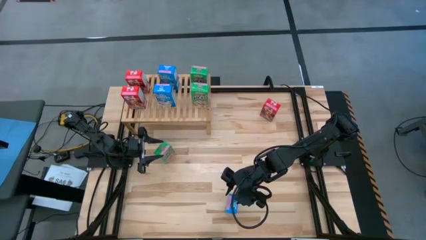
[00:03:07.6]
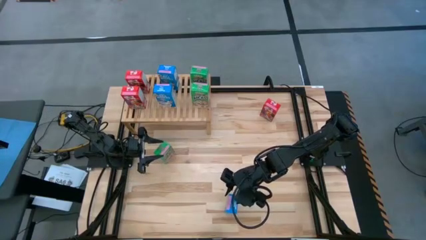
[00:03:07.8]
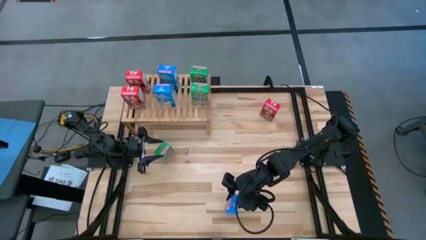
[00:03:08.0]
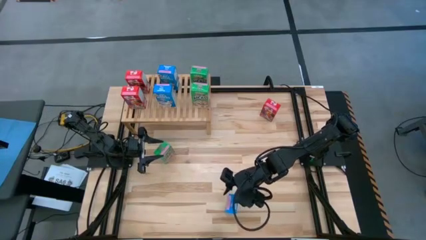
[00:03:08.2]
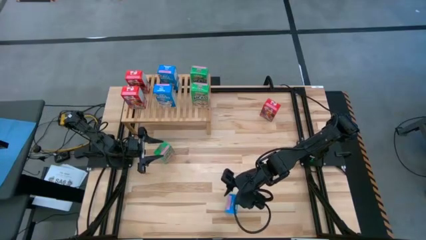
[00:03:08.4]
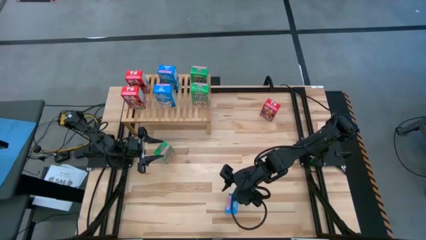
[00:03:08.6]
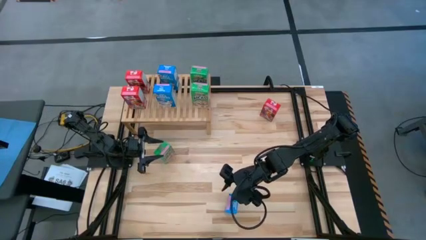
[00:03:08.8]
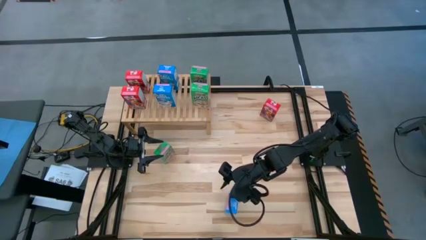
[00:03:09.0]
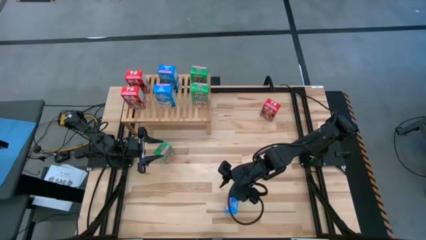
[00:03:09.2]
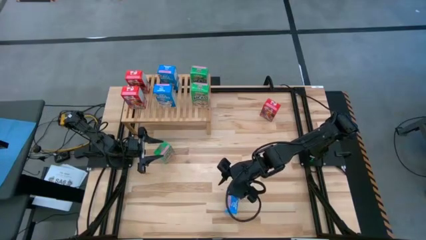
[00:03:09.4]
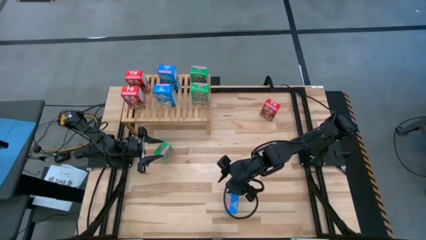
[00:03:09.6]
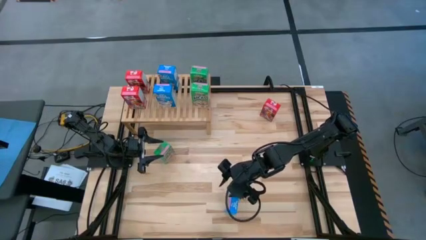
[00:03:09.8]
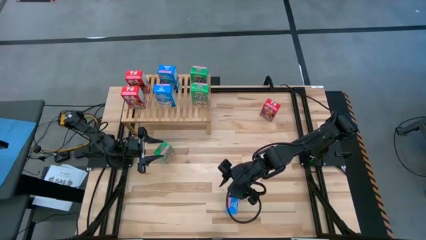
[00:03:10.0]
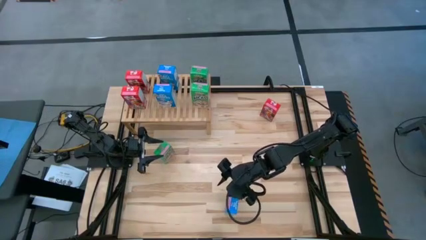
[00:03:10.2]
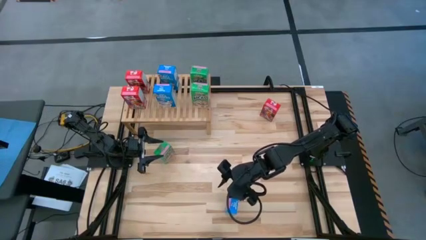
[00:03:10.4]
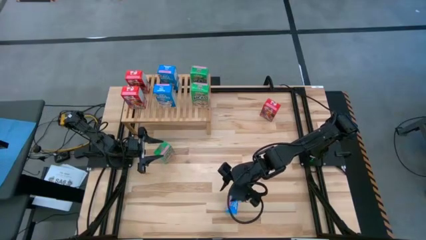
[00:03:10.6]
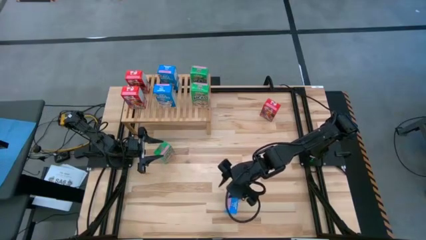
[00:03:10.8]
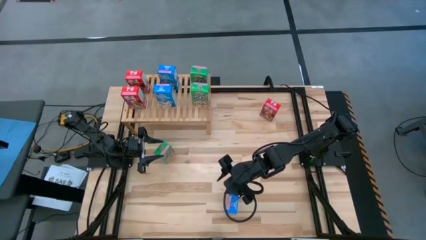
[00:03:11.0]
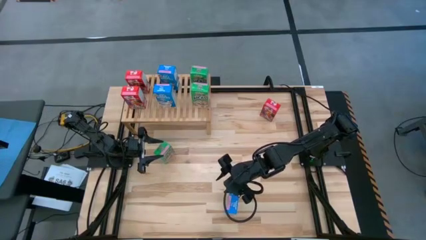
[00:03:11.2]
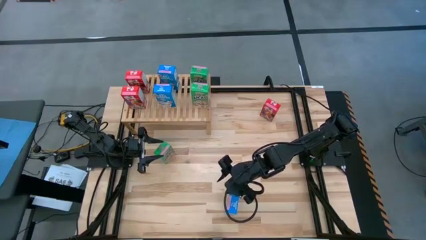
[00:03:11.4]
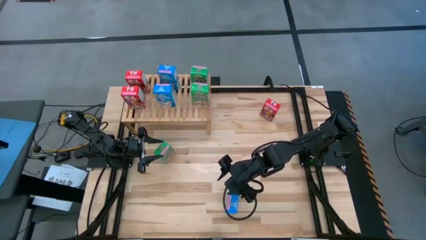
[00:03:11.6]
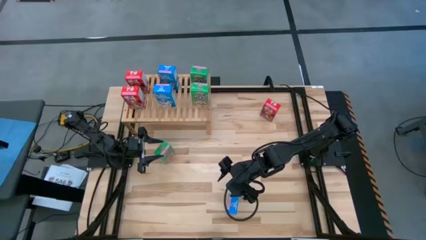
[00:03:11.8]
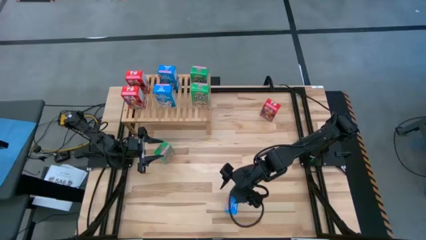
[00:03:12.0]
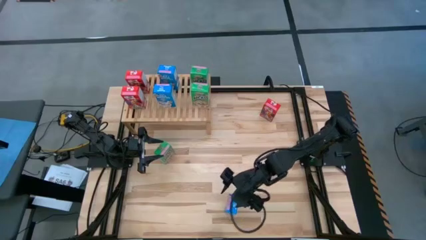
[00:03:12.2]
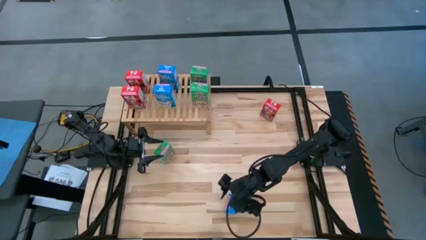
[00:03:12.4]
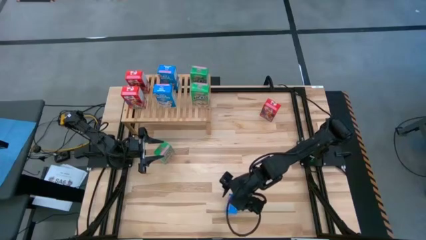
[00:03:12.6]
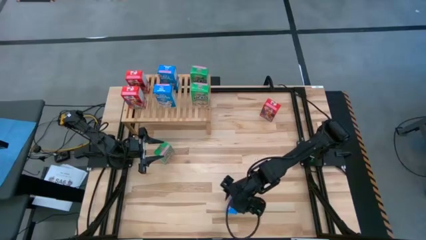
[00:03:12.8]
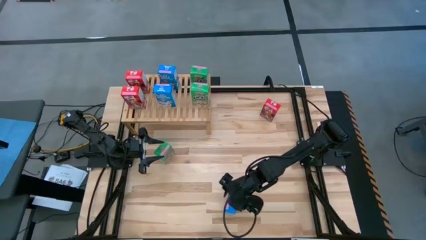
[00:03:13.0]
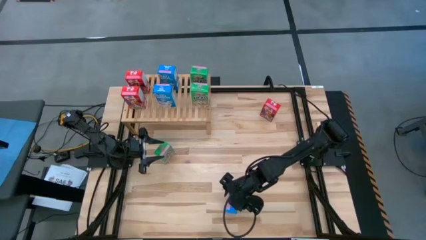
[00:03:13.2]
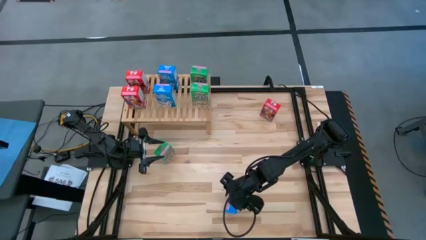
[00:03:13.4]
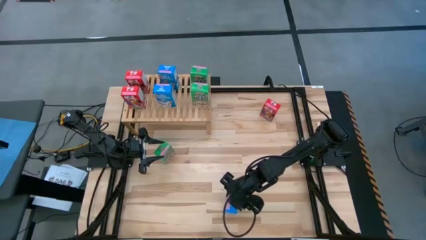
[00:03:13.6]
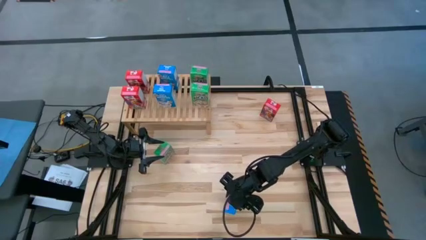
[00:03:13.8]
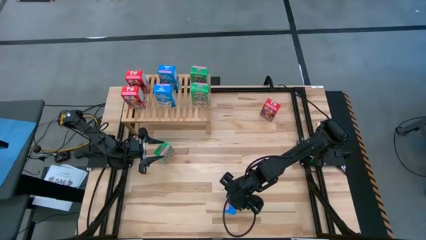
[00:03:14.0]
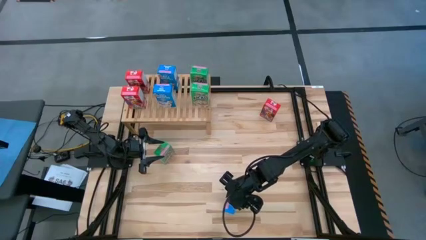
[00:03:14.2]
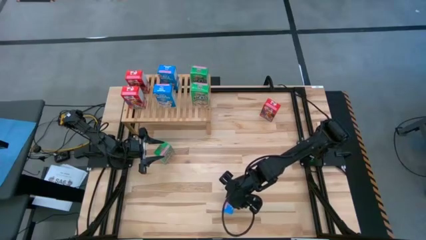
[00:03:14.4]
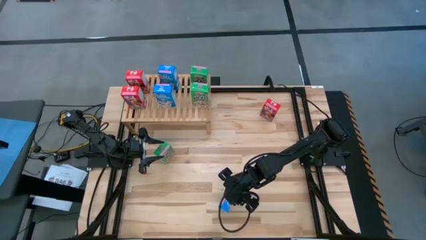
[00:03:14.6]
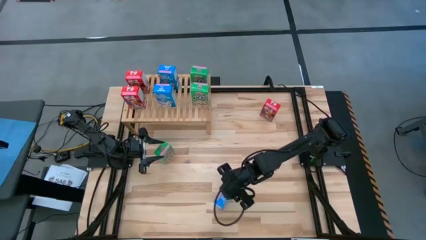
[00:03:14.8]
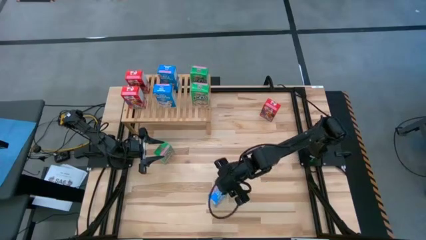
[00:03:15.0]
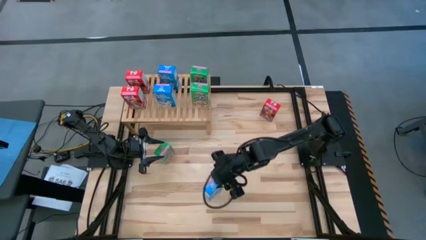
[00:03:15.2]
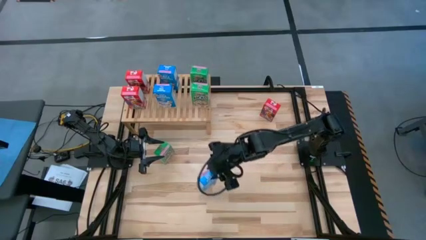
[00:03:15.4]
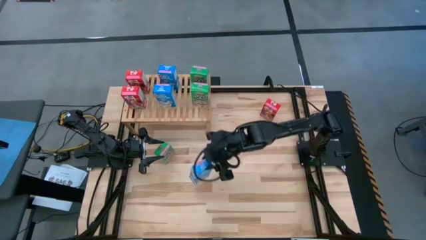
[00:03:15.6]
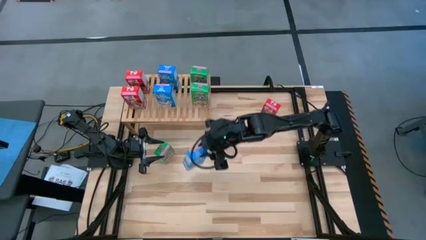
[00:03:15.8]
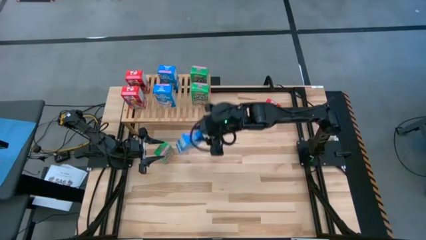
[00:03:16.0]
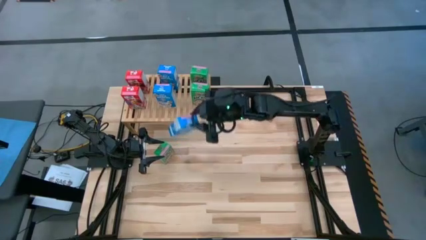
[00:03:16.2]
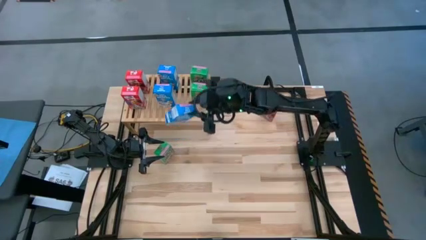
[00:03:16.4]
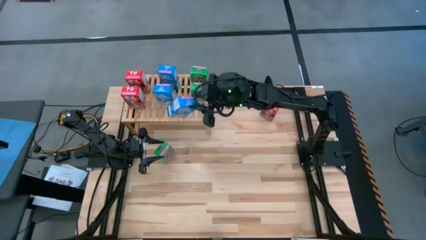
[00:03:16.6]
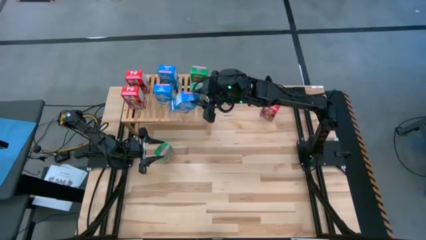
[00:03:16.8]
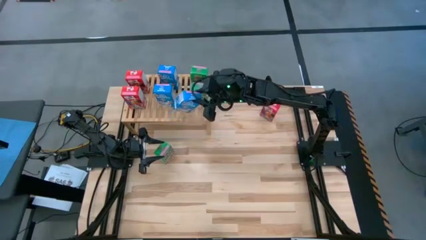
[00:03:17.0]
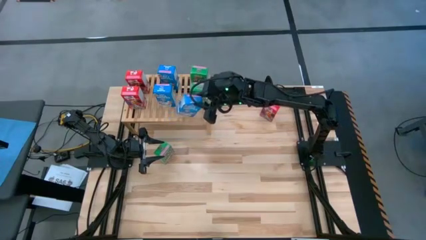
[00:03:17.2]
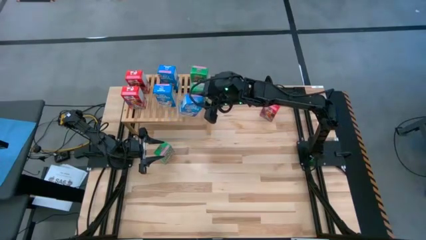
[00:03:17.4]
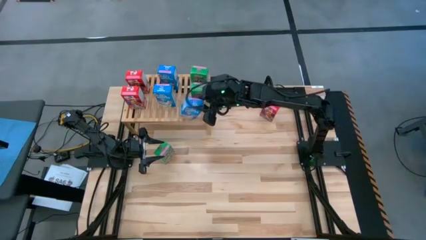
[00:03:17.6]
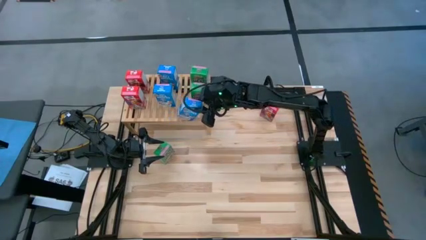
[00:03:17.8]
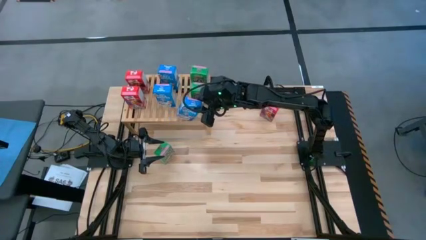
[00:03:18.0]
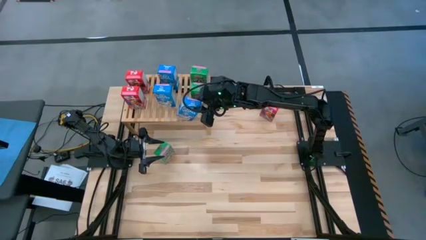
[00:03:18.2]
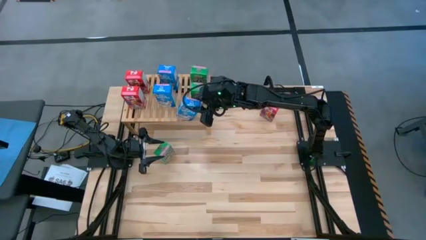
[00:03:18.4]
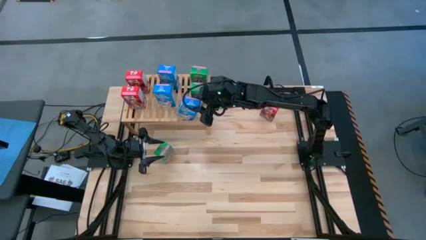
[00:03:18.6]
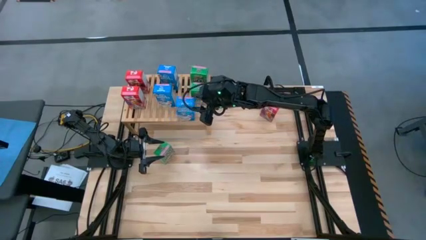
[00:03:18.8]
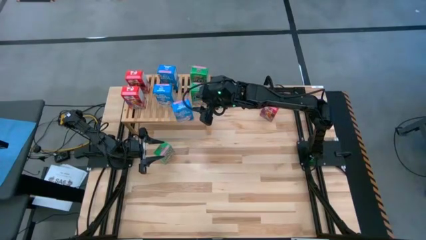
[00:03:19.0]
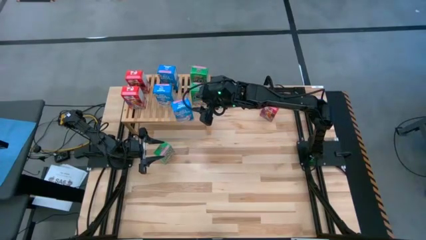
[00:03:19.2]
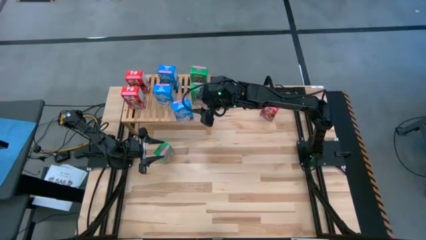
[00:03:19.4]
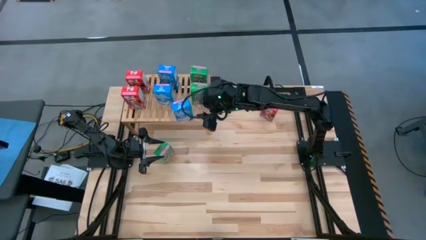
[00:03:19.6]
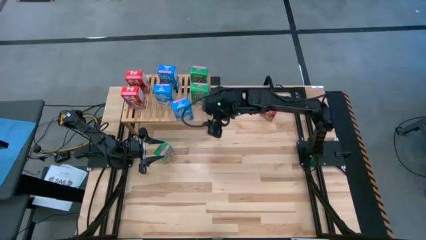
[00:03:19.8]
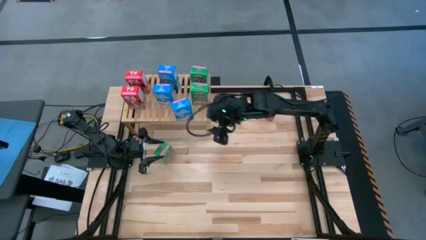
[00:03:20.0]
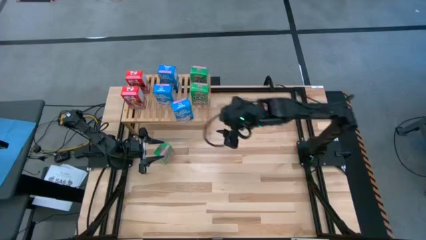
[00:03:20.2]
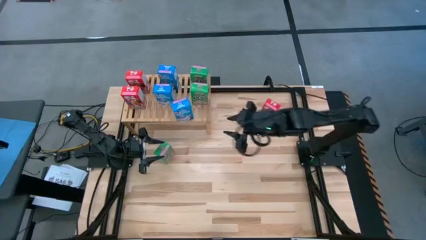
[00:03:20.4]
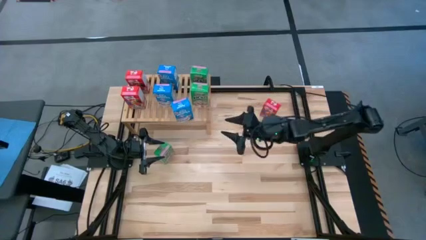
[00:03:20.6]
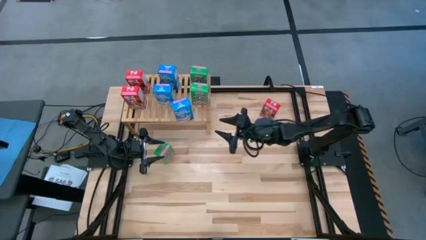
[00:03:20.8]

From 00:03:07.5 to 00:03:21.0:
Task: Stack cereal on shelf
Put the blue cereal box on the shelf aligned with the blue cereal boxes

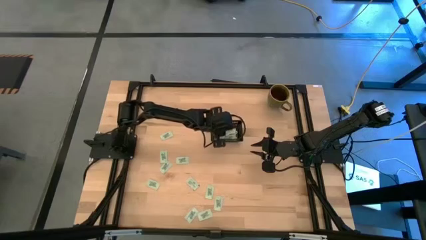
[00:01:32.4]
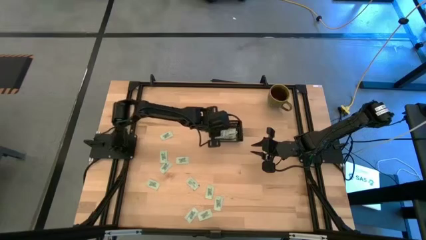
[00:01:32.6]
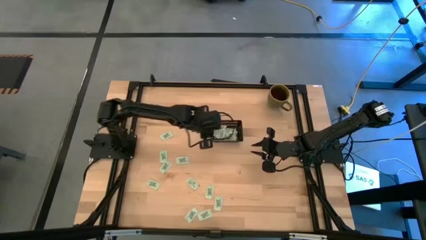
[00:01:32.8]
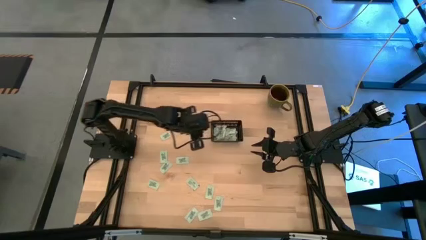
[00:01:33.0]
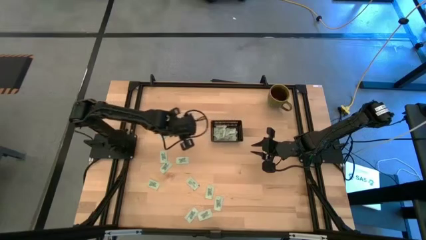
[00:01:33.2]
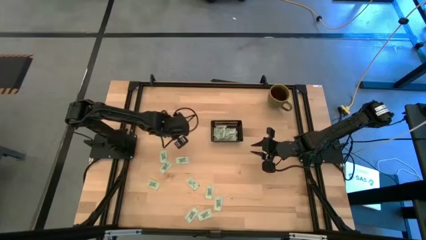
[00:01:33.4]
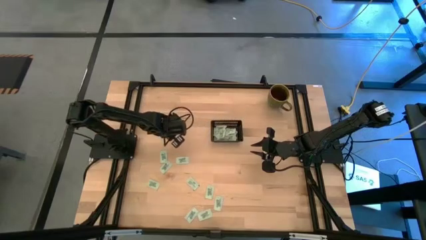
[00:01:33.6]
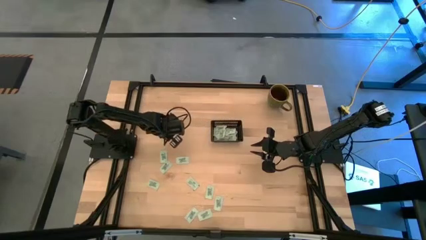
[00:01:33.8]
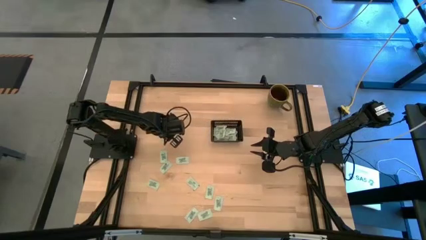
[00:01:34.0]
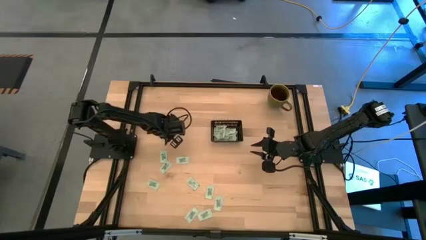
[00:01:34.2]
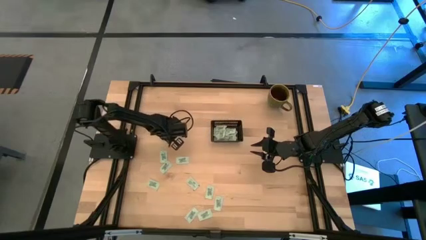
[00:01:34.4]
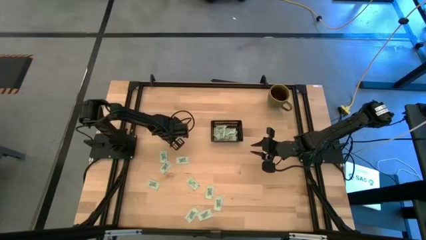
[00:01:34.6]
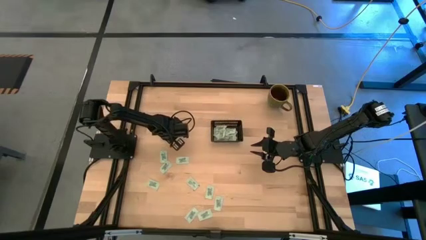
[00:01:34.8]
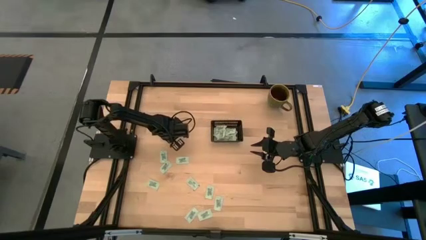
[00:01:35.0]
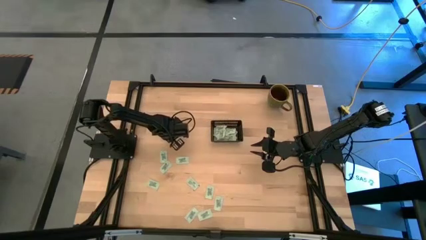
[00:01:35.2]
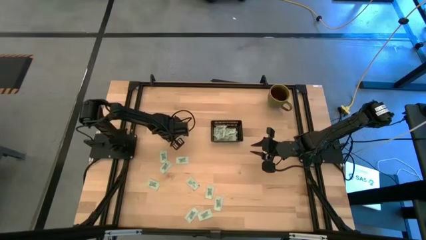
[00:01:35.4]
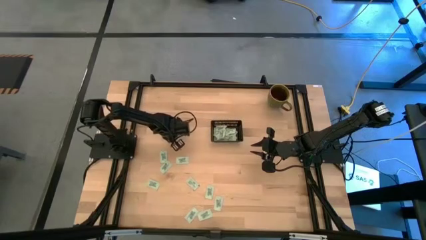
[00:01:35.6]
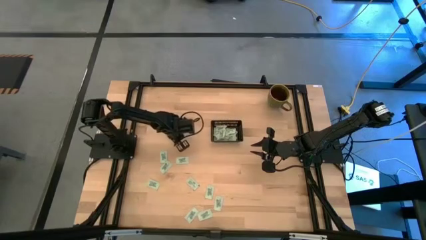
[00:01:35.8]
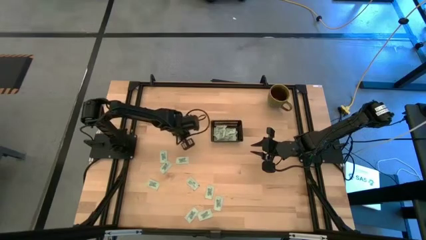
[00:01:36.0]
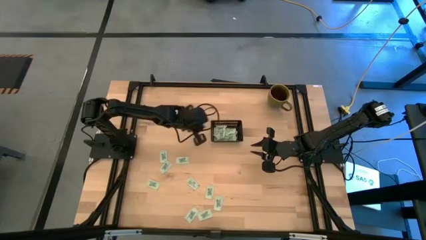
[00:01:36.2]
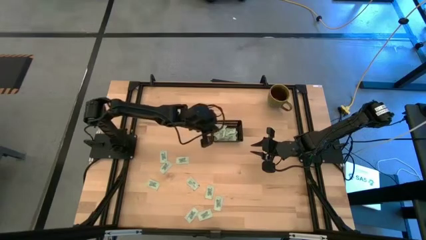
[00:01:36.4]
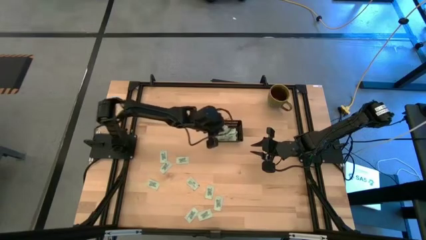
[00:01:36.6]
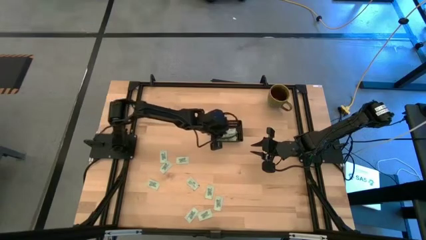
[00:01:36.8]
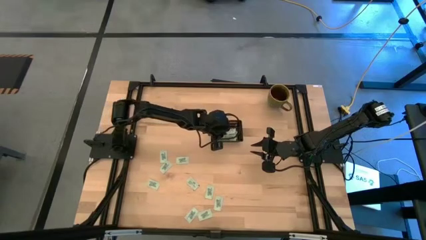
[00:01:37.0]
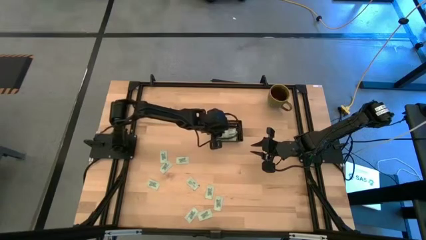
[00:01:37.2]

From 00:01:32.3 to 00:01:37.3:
Task: Pick and place Stevia / Truvia into bins
Put the stevia packet into the black basket
